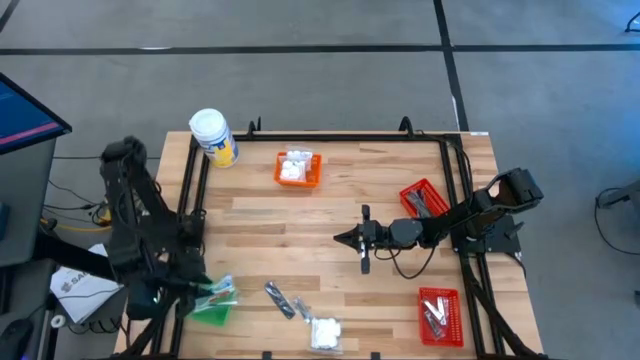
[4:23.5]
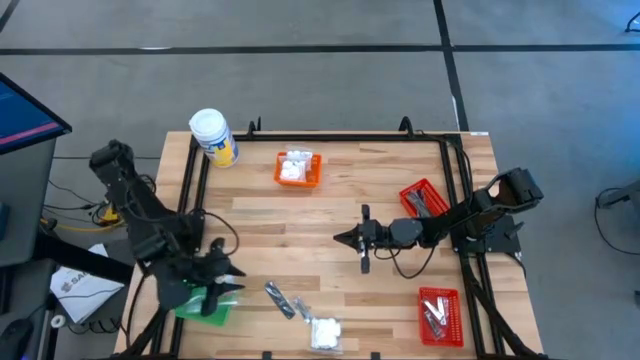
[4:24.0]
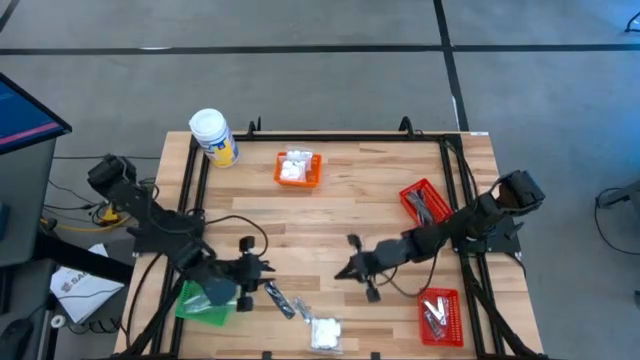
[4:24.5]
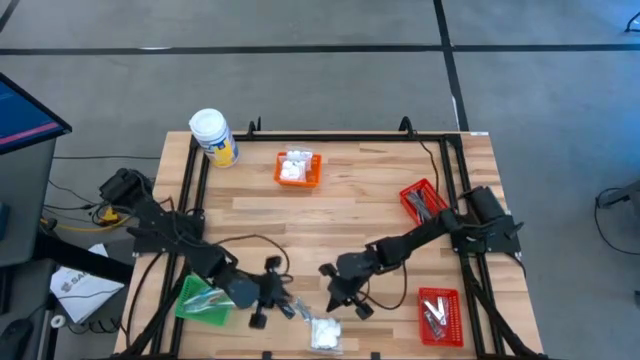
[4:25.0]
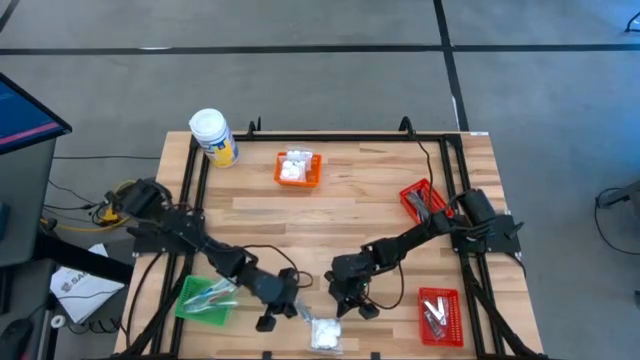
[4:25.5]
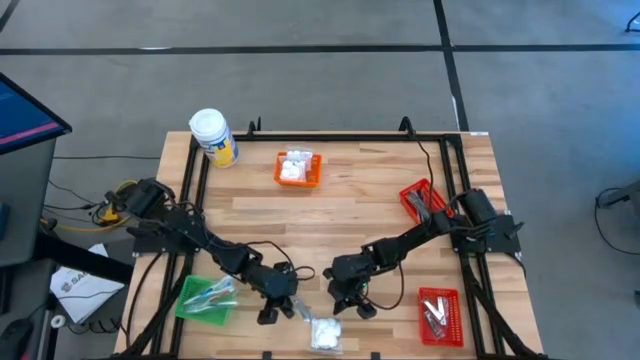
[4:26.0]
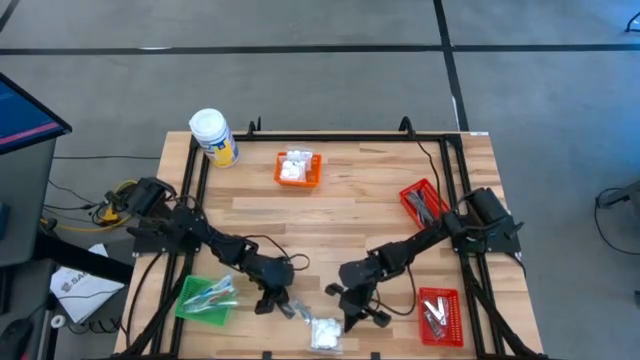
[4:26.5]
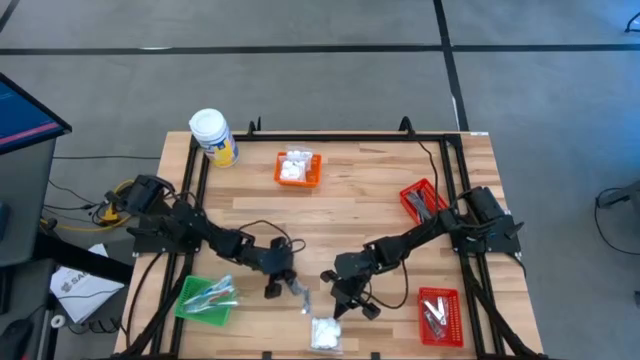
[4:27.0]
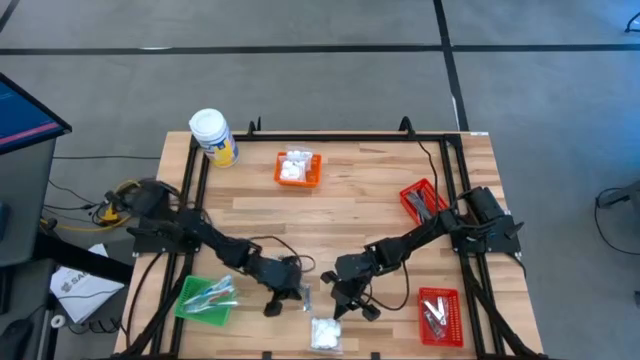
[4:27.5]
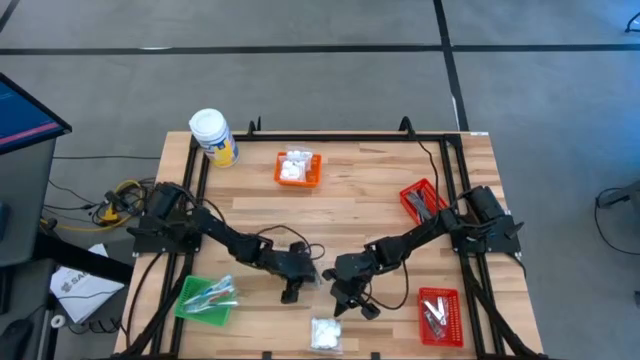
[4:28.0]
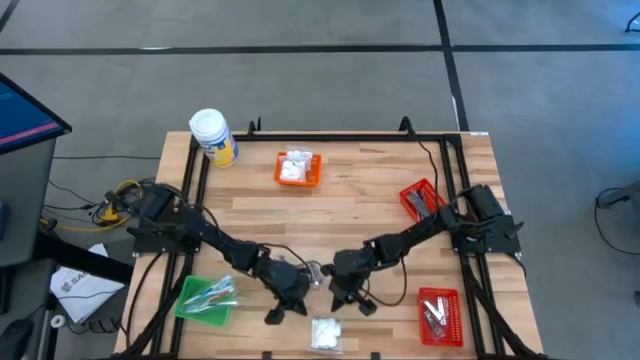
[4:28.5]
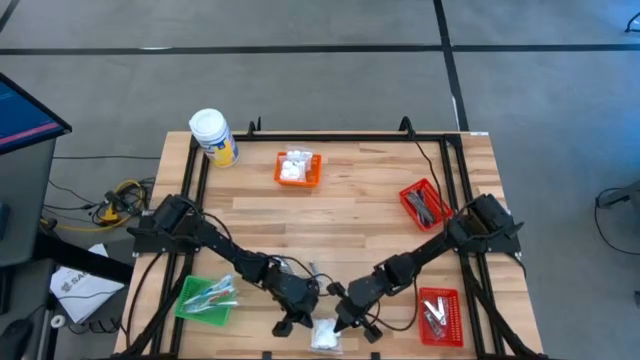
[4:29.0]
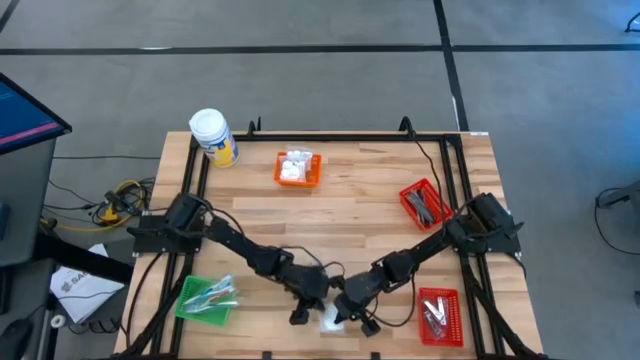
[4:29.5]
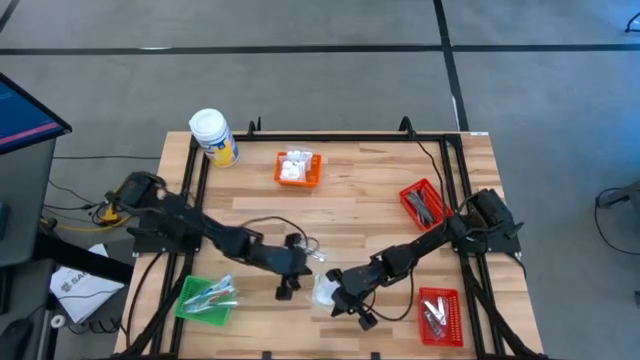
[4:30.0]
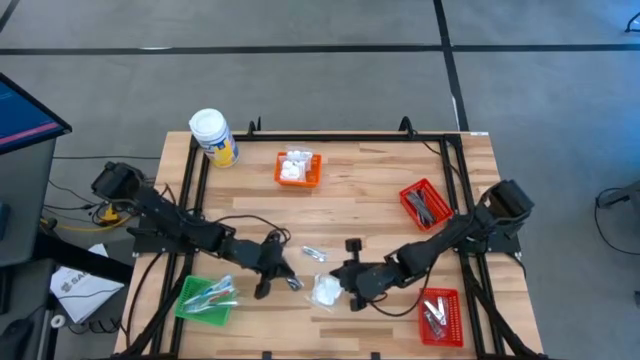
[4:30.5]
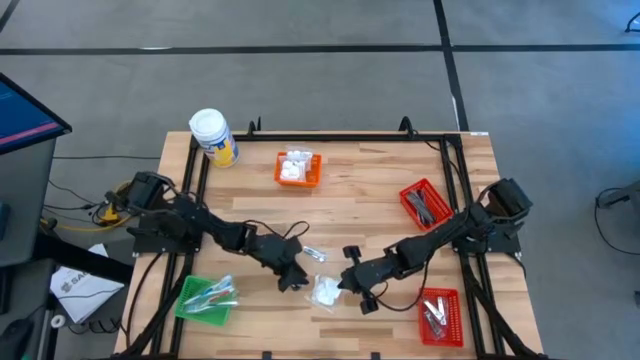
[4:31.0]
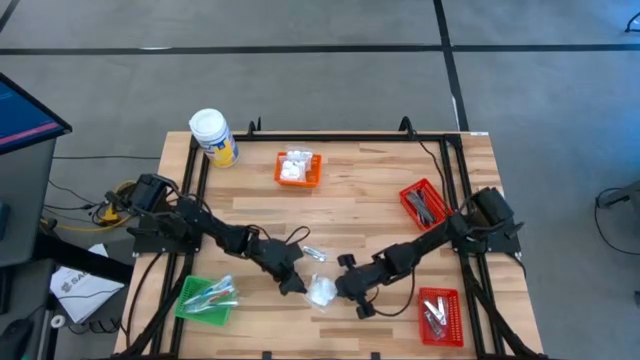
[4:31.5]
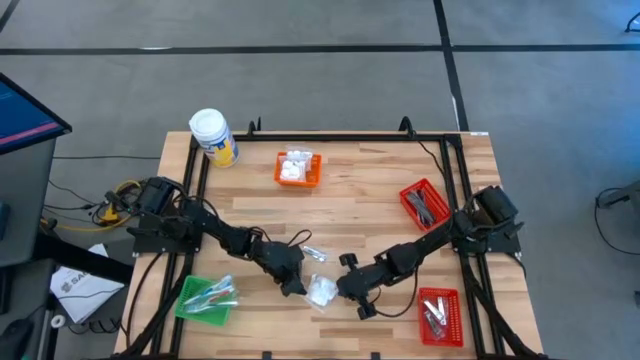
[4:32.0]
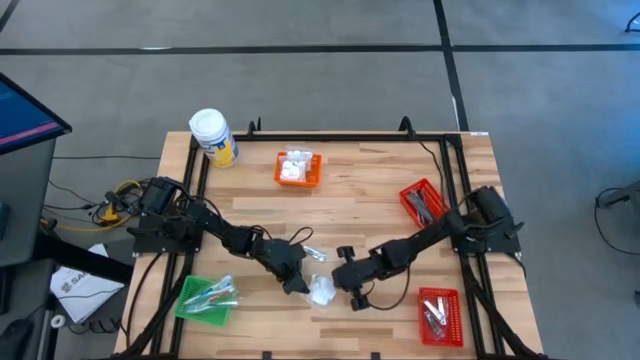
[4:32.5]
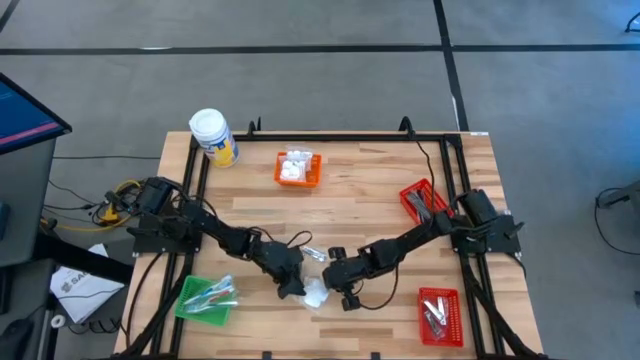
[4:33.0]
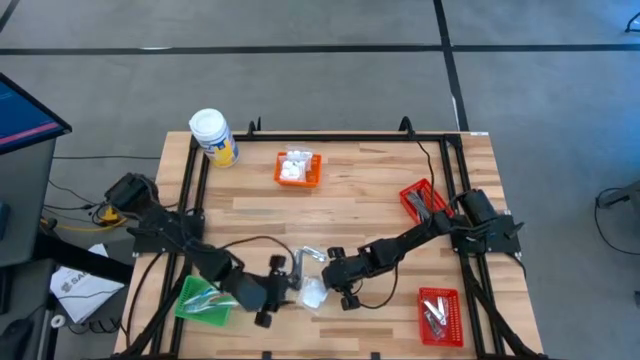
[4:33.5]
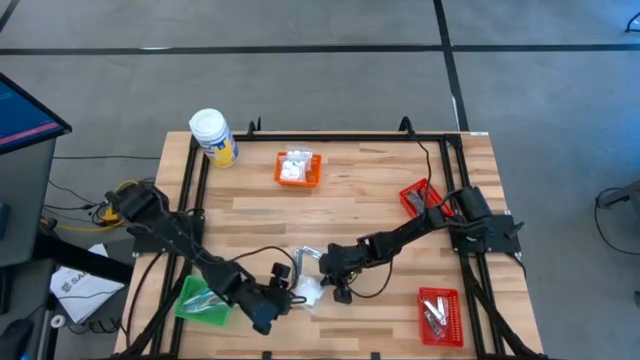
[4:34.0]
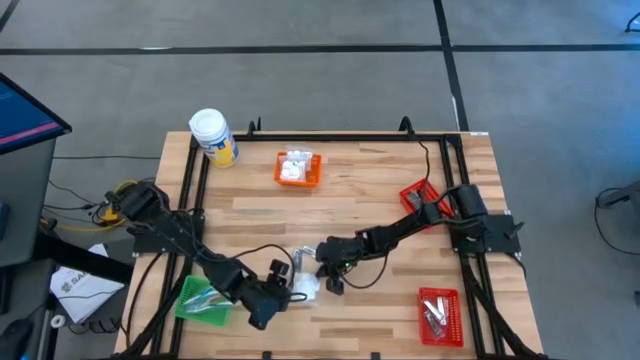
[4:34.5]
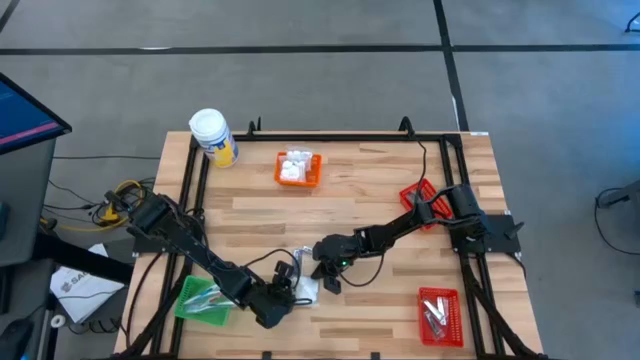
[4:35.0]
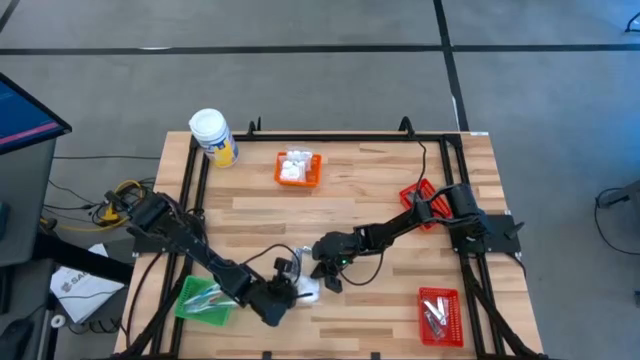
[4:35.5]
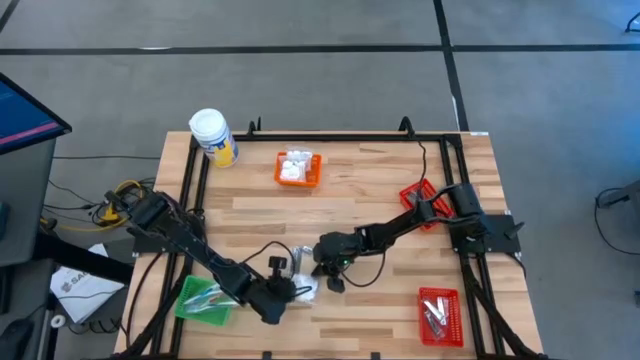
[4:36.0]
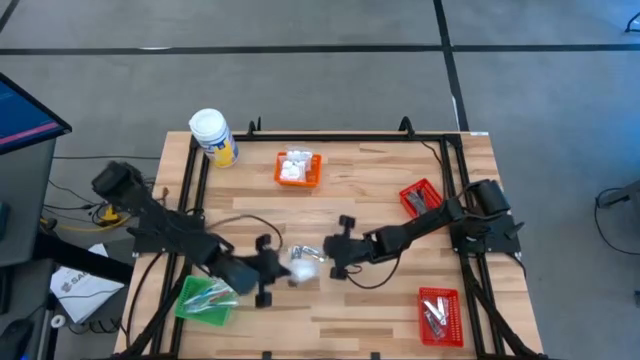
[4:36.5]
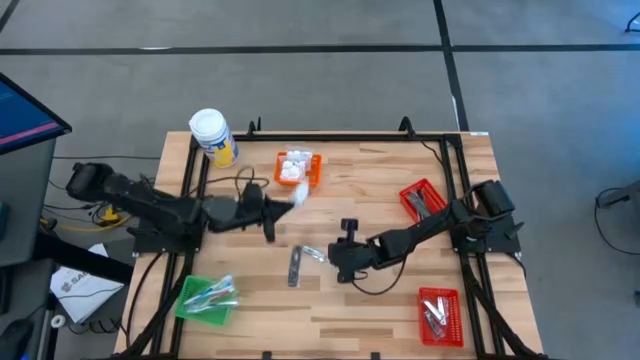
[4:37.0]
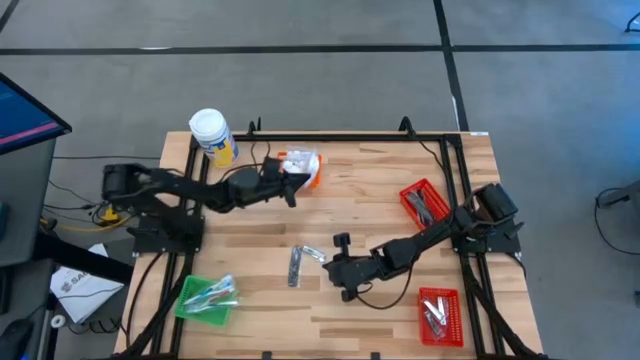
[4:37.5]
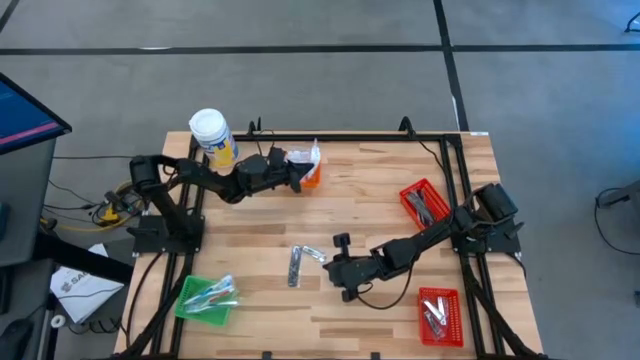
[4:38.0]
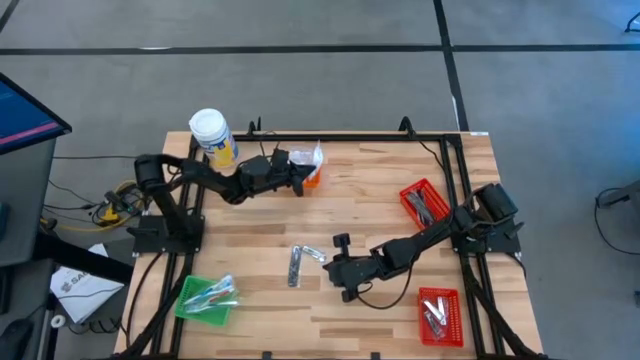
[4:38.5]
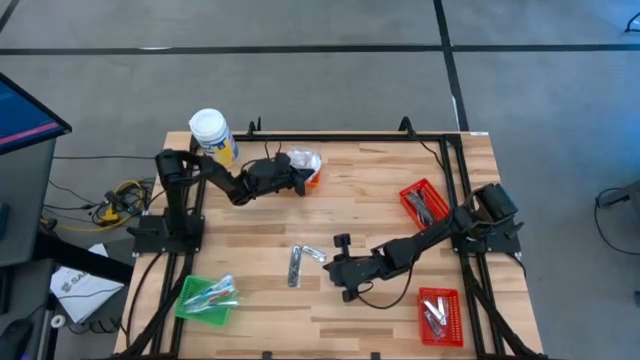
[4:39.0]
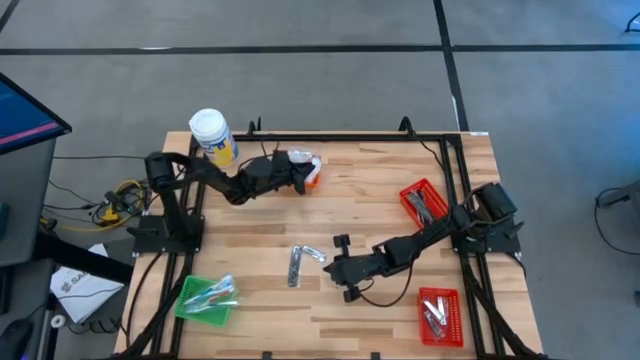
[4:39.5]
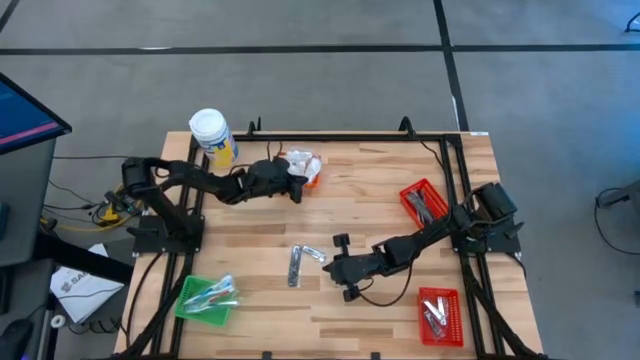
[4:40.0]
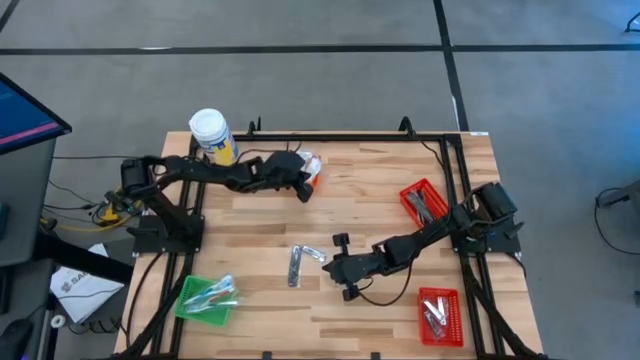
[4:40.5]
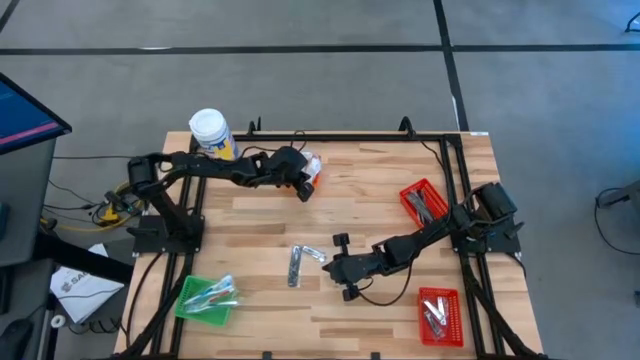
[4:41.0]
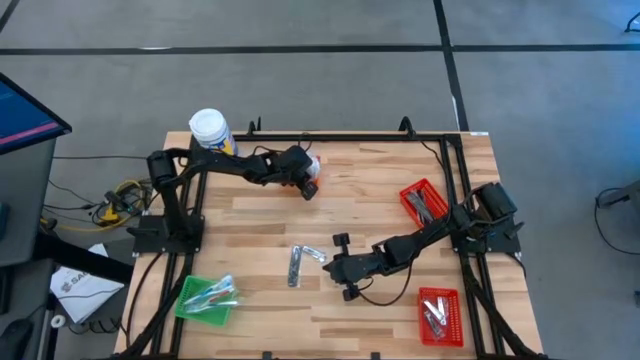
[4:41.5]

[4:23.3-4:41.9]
Task: Pick & Place Travel size toiletries
Put the white cotton pack into the orange basket

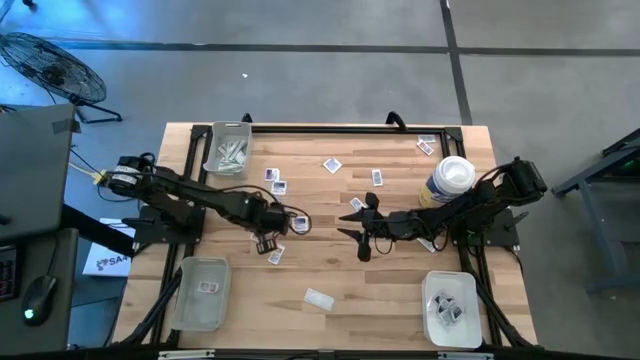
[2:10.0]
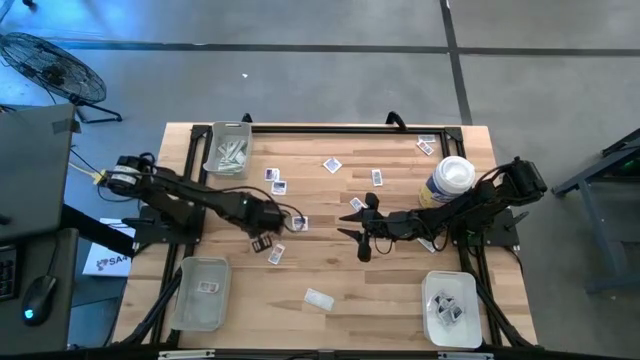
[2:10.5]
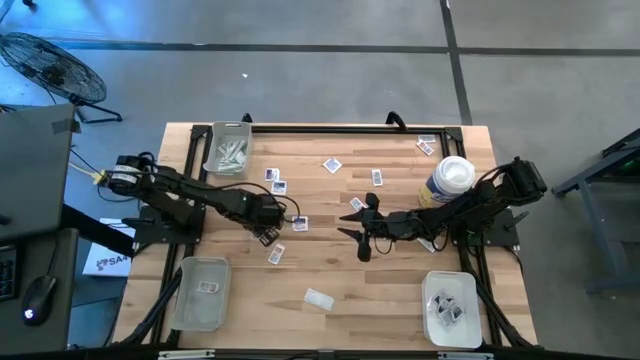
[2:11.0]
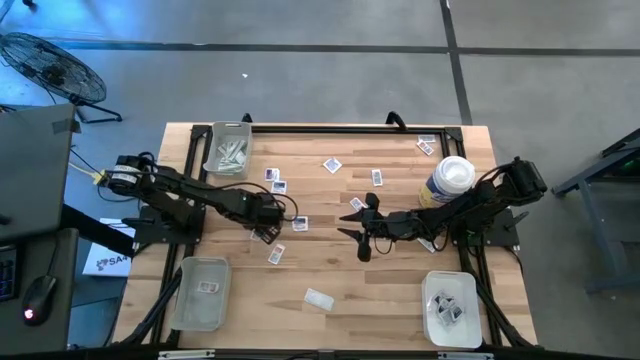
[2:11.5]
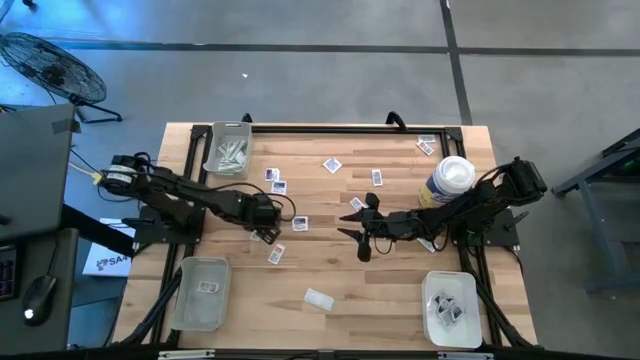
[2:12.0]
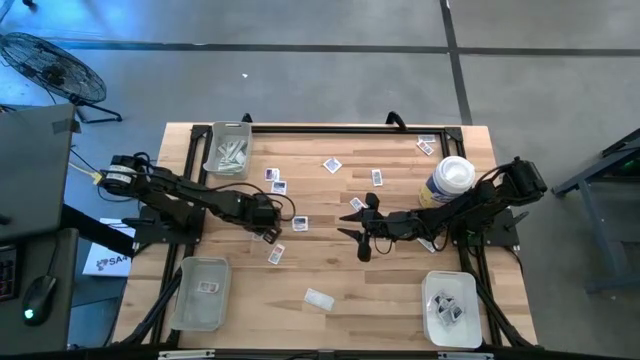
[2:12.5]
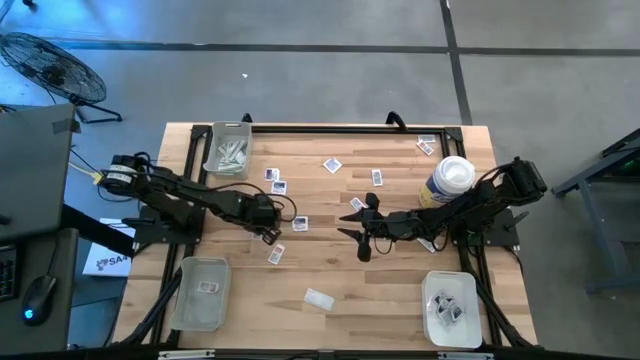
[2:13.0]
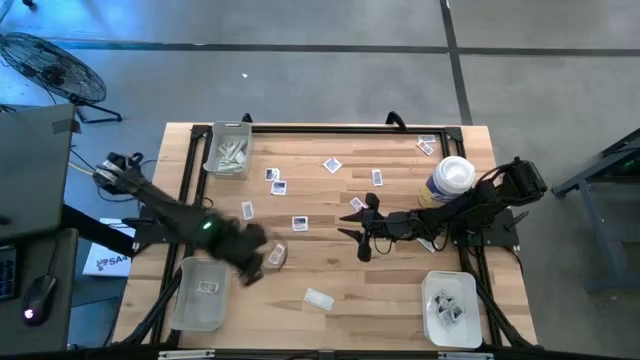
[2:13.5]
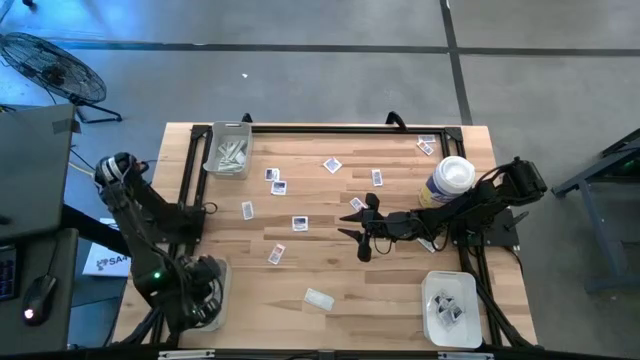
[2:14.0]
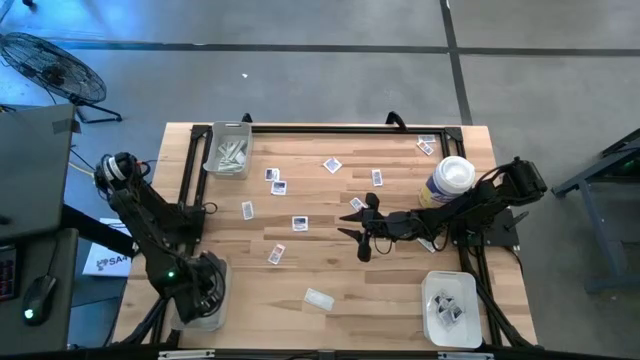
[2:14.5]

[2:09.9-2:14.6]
Task: Pick & Place First Aid Supplies
Put the orange ointment pack into the bottom gray bin
